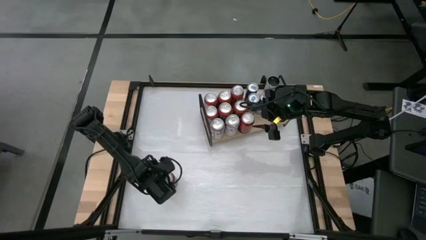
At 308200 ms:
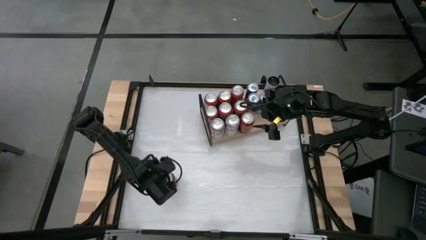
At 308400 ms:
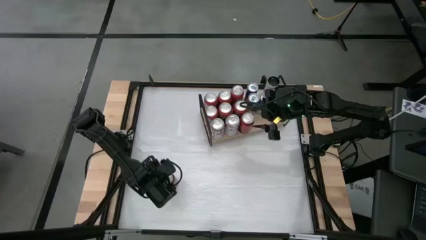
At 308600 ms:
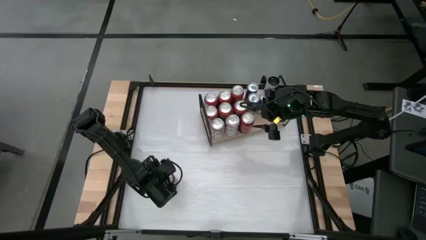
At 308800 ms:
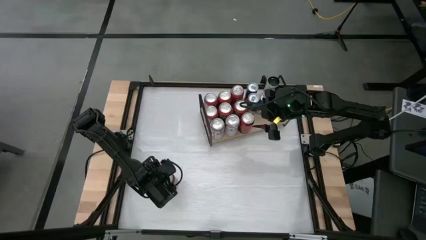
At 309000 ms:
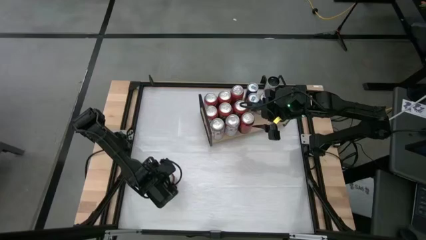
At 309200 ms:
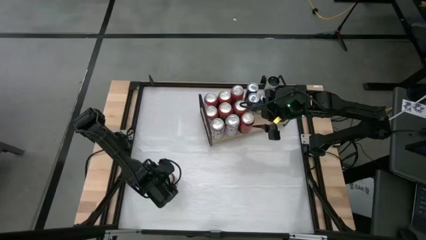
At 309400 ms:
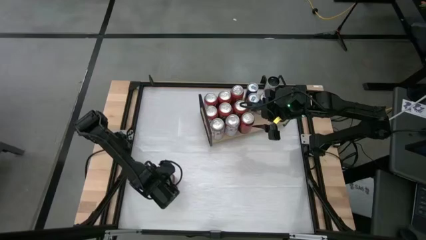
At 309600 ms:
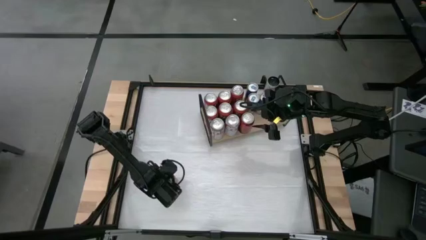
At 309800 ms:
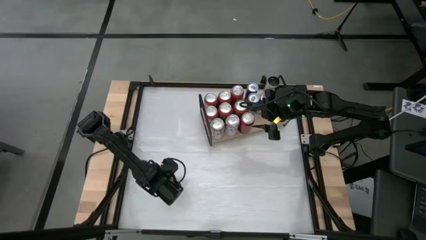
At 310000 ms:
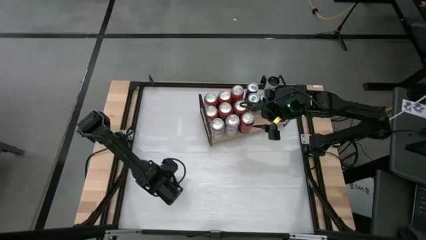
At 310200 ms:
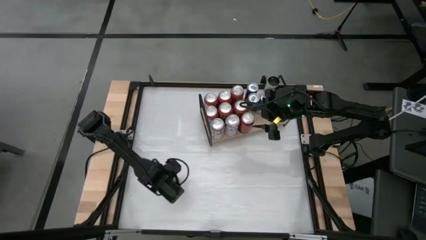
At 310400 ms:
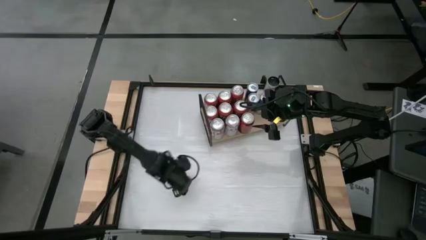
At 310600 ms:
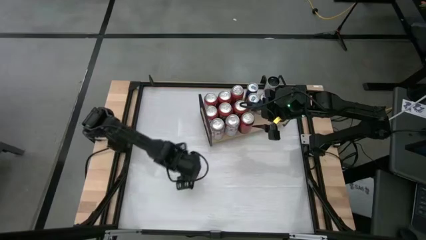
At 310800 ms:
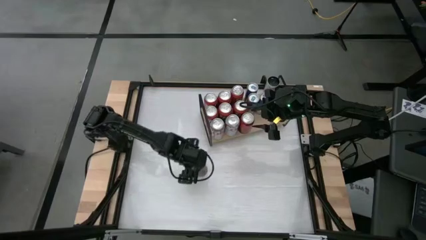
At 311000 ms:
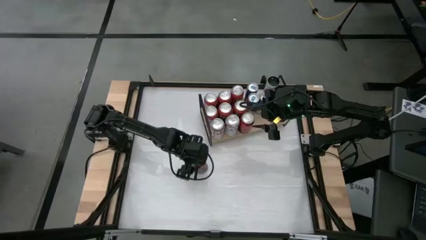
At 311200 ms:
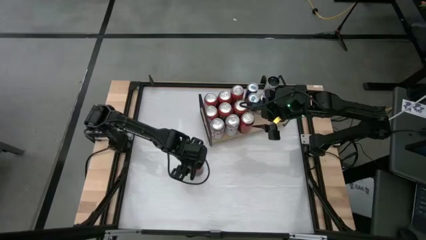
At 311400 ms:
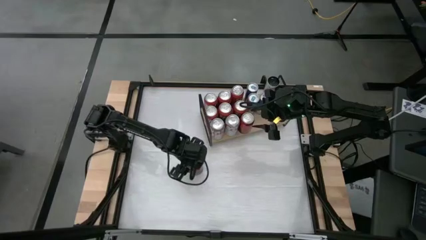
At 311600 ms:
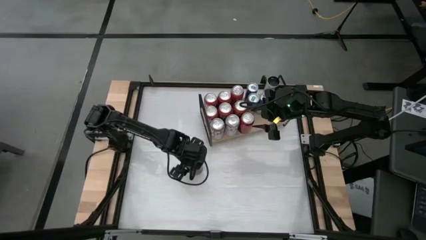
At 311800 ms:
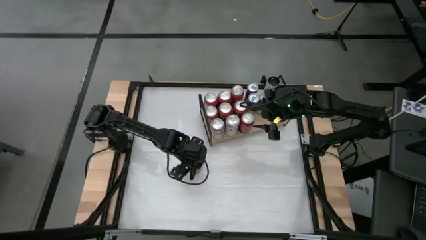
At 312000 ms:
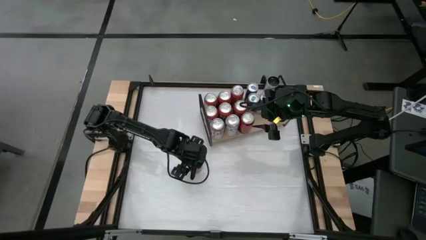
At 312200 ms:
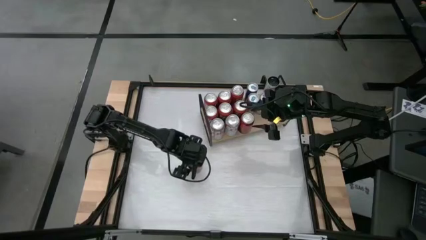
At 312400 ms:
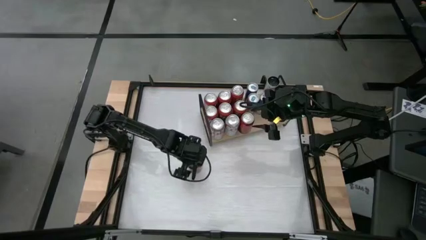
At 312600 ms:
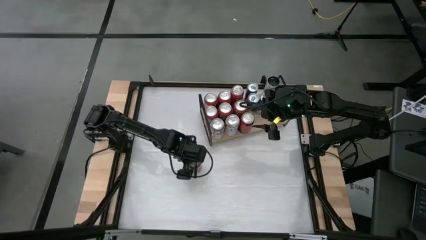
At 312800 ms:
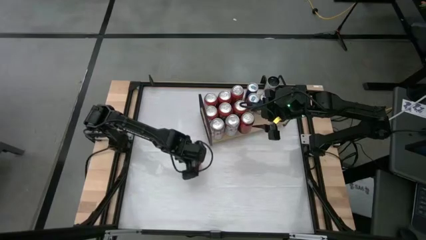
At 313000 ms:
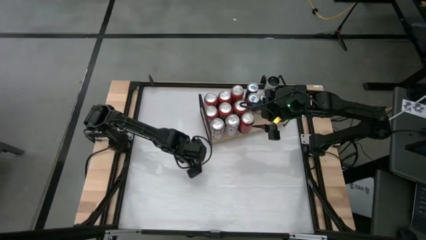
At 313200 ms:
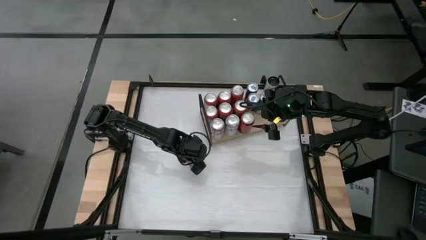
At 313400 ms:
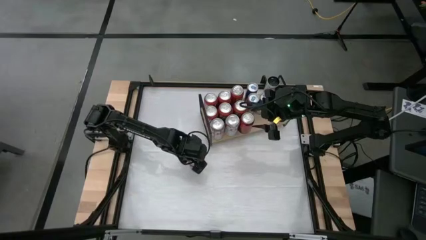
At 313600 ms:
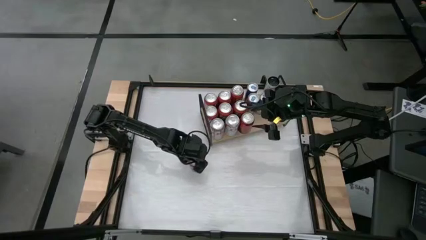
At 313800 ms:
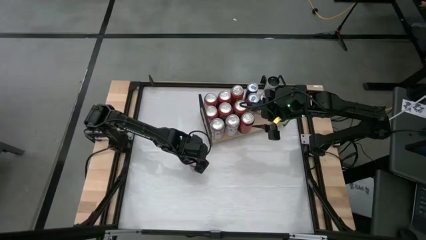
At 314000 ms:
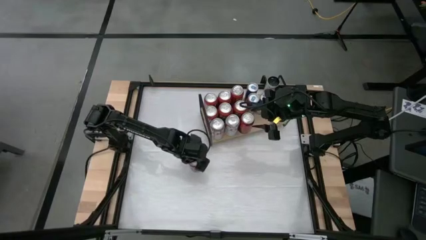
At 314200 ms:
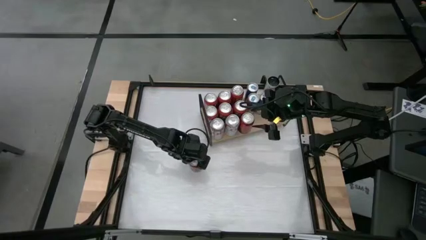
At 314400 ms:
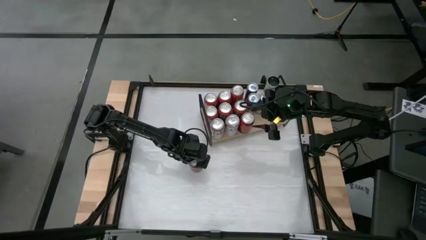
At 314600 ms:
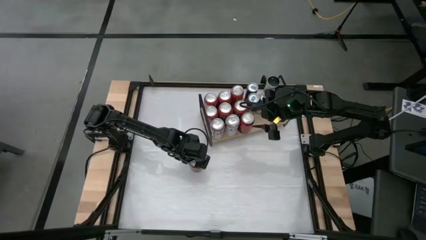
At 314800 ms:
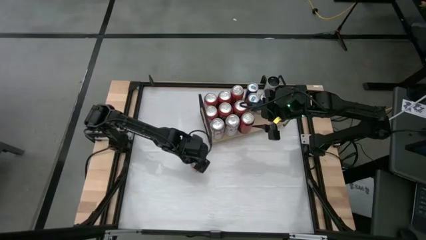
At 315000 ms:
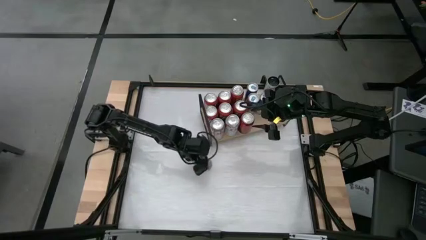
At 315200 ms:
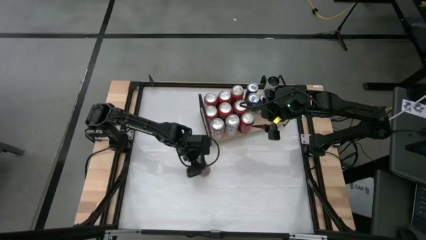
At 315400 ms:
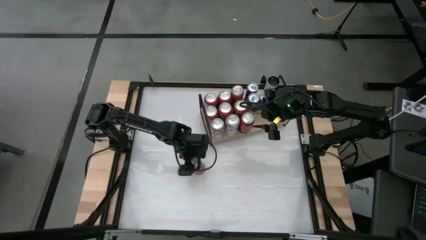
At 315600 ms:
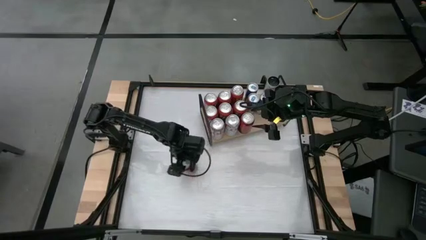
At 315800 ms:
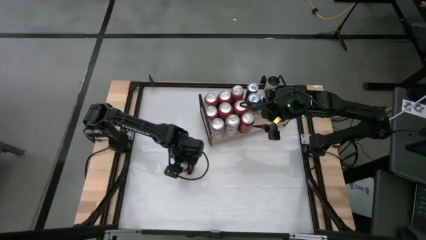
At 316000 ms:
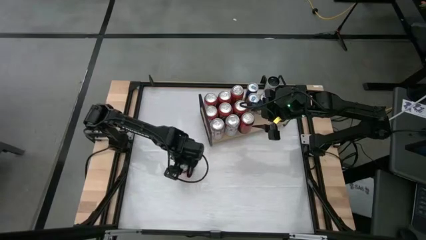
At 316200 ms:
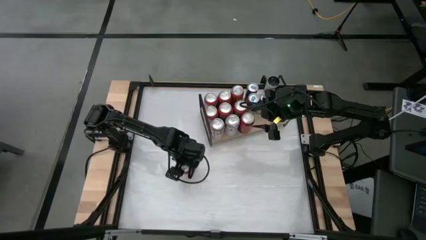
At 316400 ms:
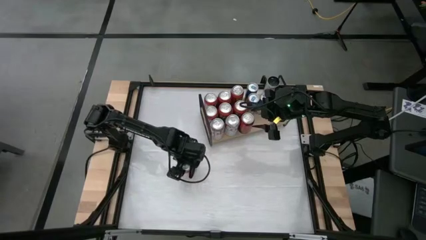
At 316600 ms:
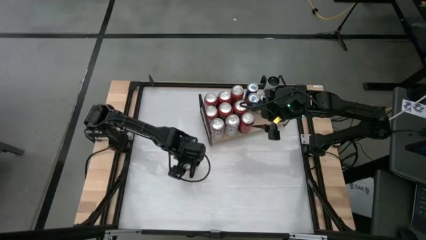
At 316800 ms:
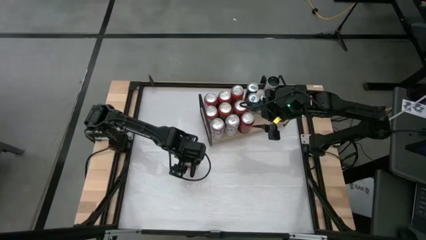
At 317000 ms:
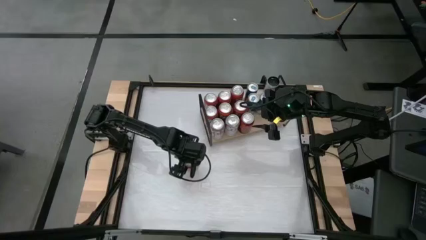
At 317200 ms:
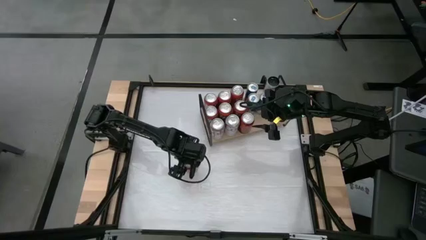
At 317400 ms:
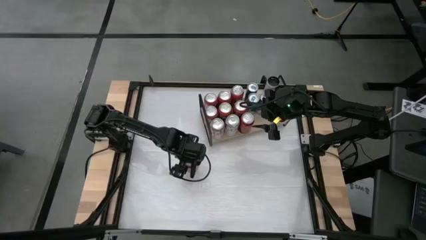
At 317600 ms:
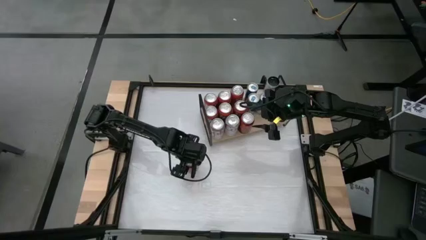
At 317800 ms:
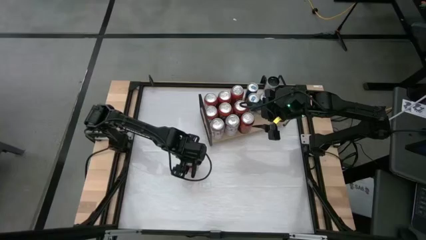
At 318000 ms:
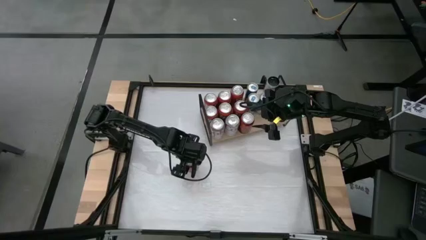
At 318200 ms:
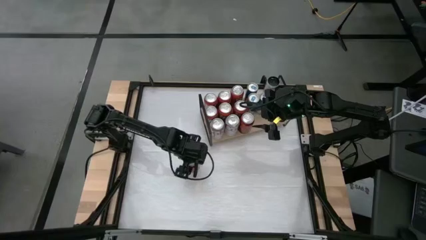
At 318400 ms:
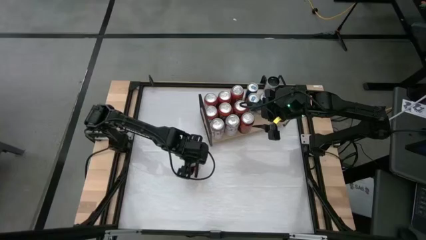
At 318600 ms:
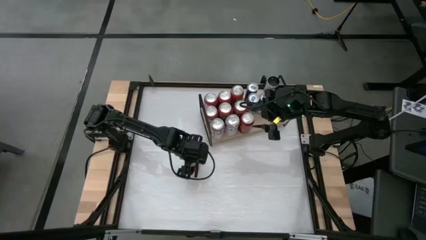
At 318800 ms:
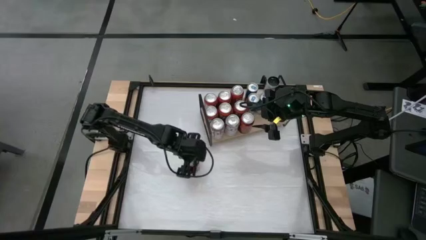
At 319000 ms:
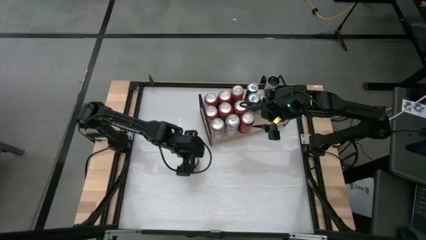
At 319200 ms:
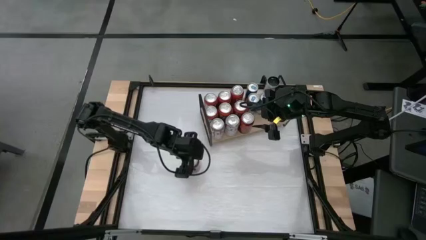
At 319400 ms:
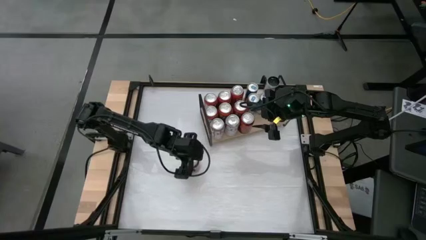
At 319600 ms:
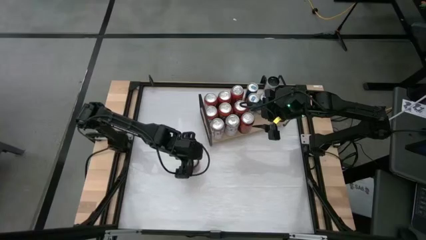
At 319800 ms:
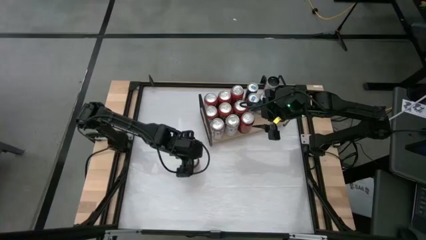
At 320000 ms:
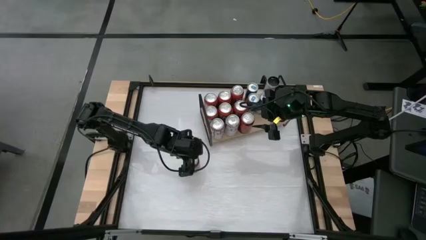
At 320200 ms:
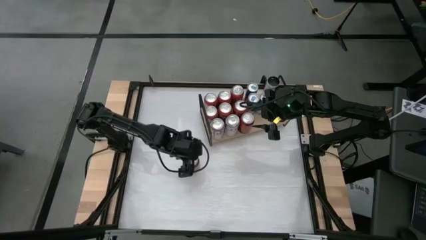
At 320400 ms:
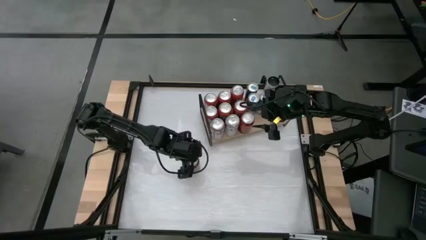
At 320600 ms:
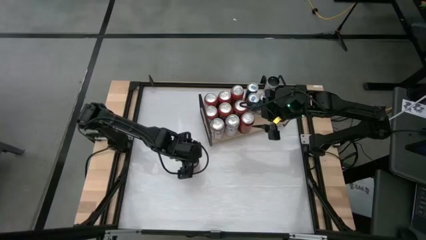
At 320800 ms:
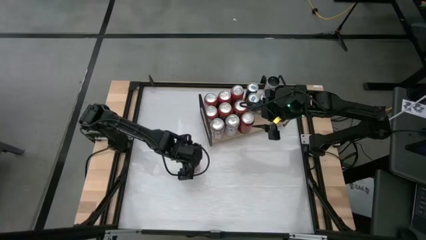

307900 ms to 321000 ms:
Task: Place canned beverage on shelf
Put the red soda can on the shelf
